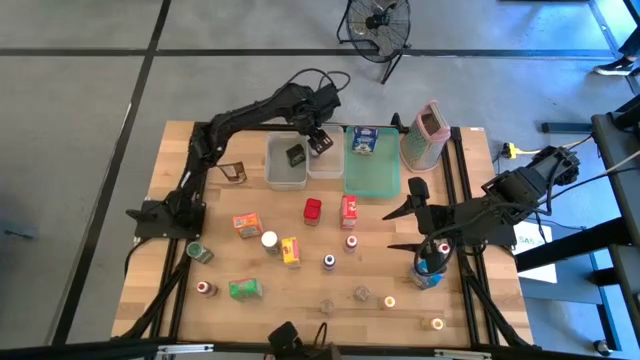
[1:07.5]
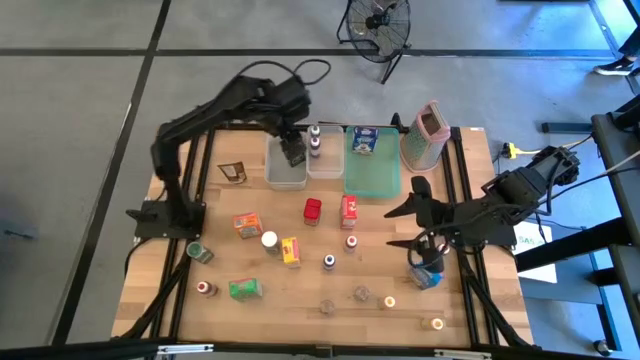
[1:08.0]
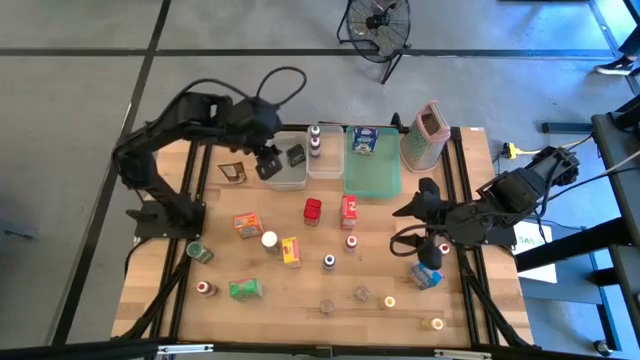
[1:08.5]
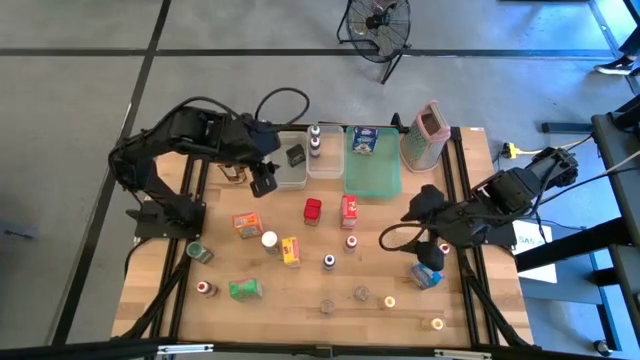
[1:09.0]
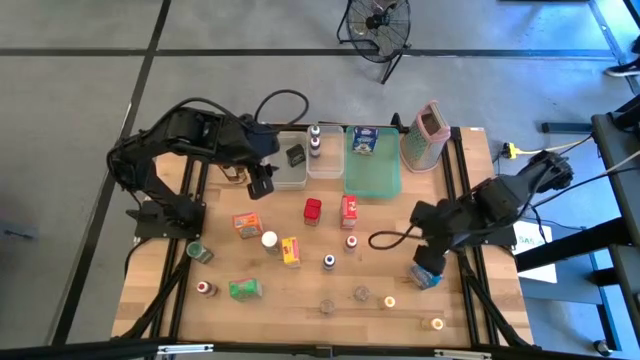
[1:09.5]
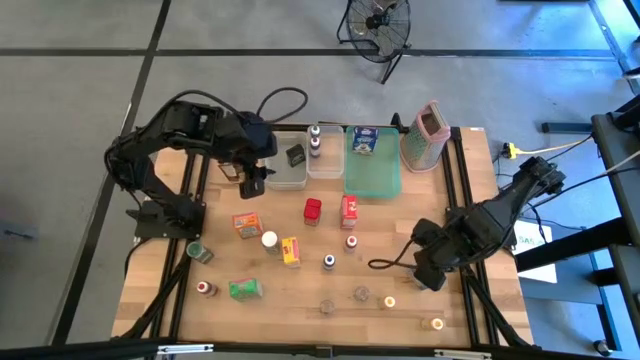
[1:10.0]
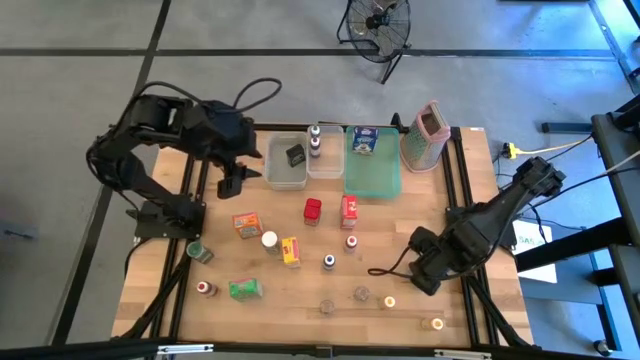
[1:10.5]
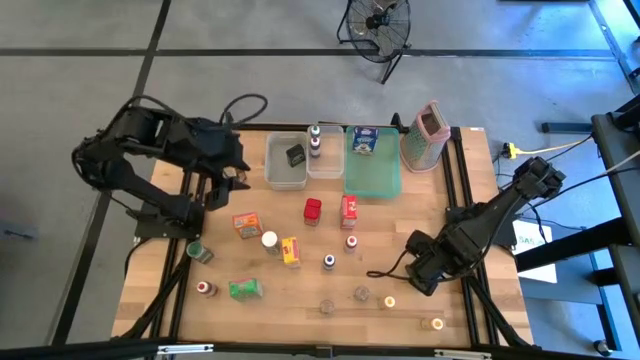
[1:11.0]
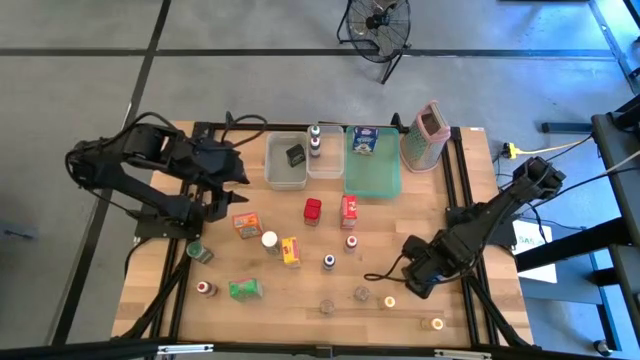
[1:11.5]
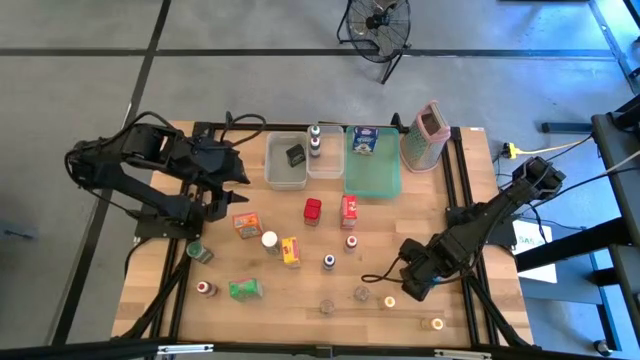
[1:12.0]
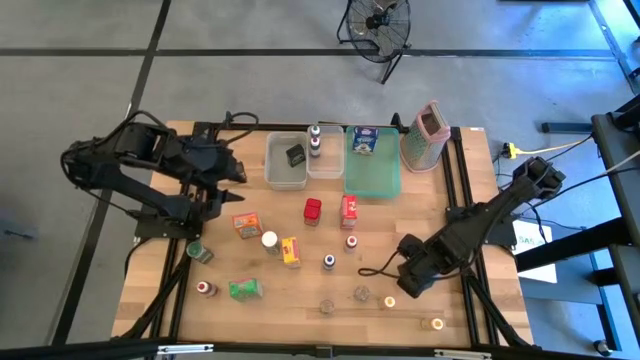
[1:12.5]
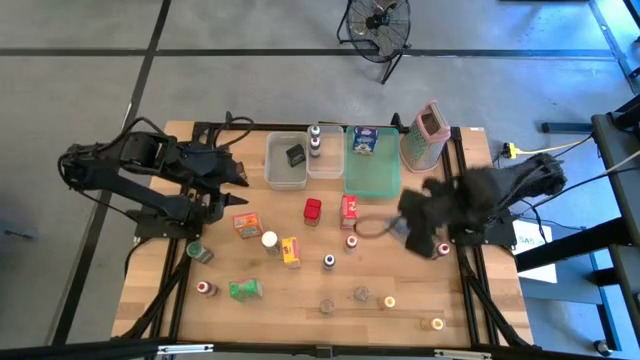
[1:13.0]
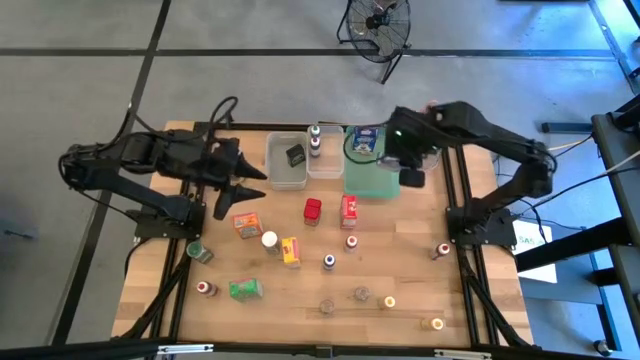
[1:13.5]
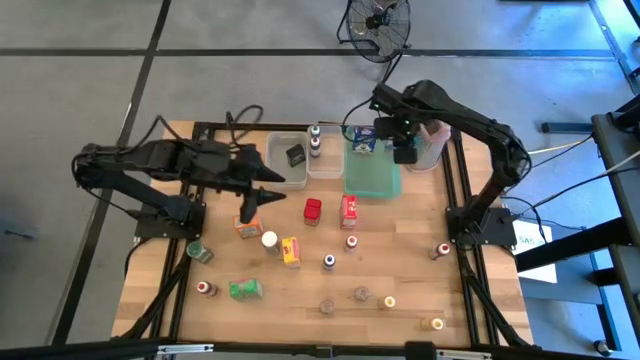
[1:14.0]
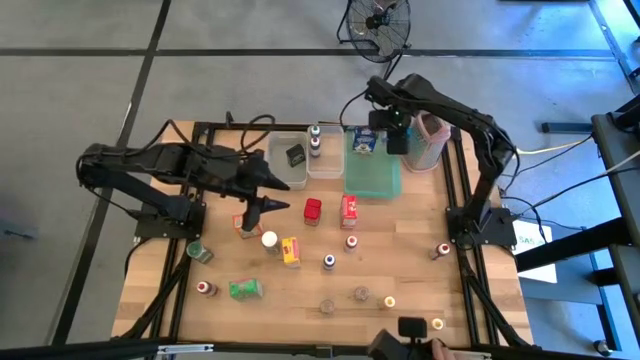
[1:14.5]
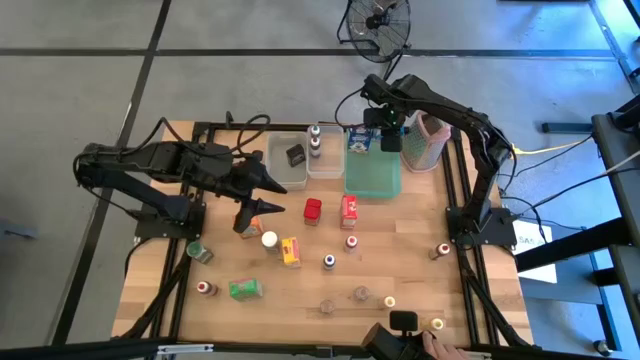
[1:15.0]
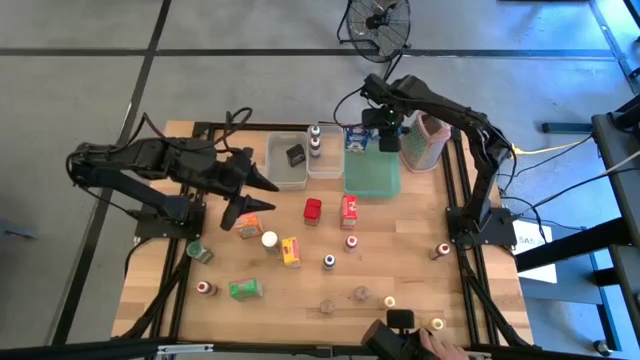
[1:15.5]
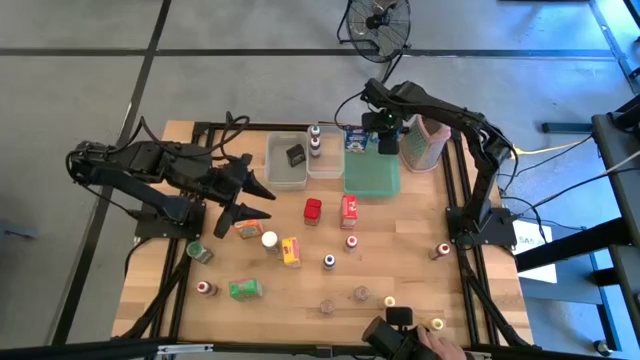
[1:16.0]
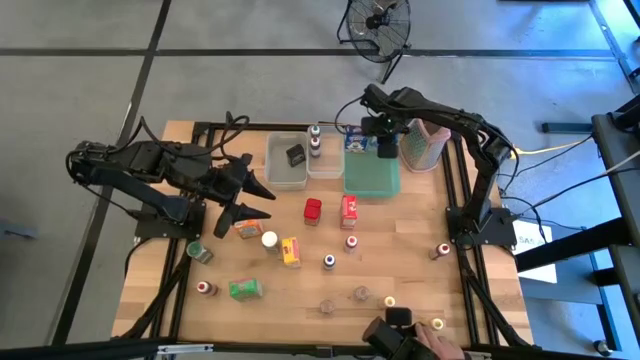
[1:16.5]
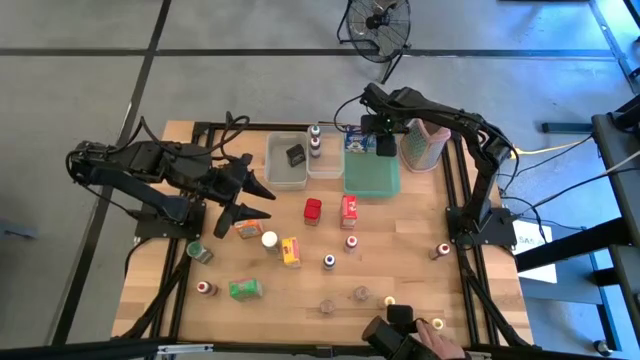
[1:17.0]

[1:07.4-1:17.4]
Task: Pick & Place Kitchen Items
Put the light blue cereal box into the green bin

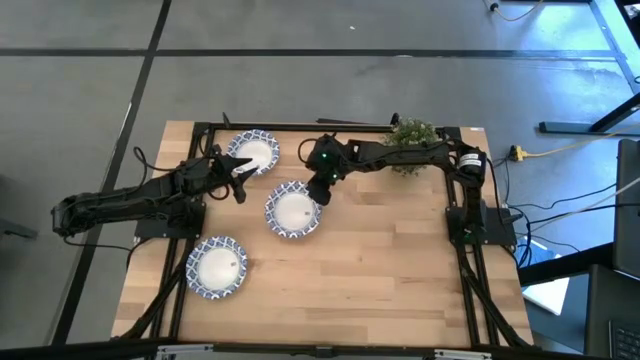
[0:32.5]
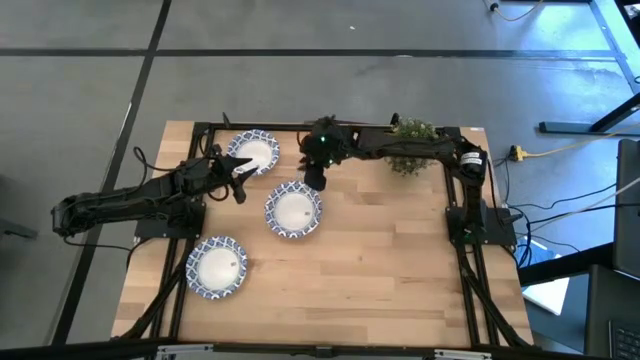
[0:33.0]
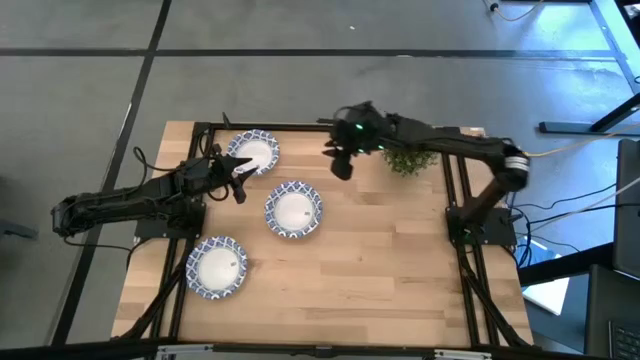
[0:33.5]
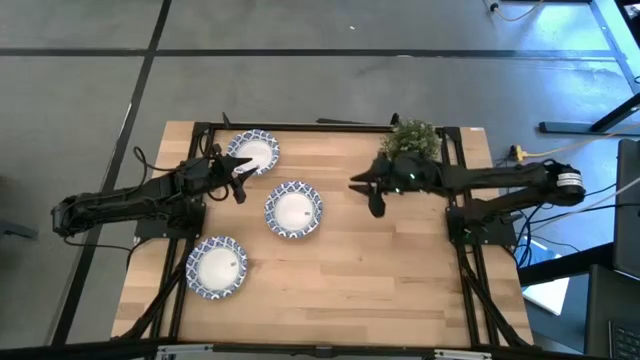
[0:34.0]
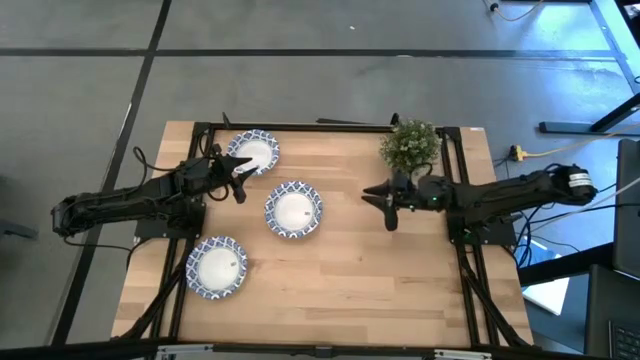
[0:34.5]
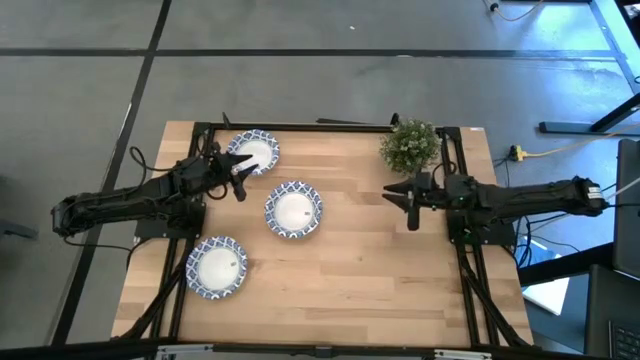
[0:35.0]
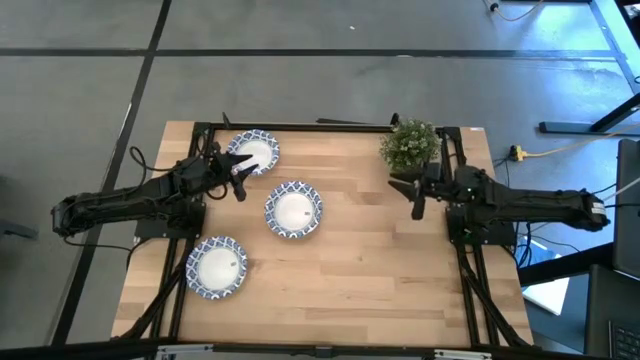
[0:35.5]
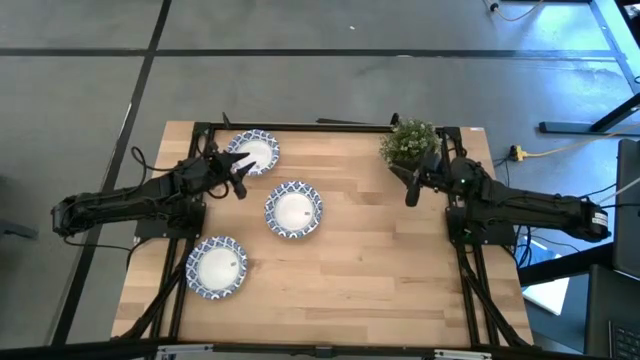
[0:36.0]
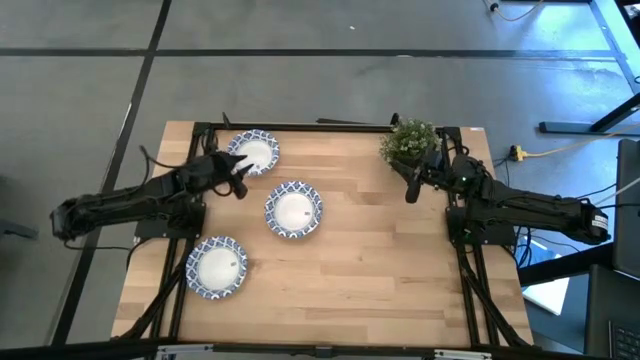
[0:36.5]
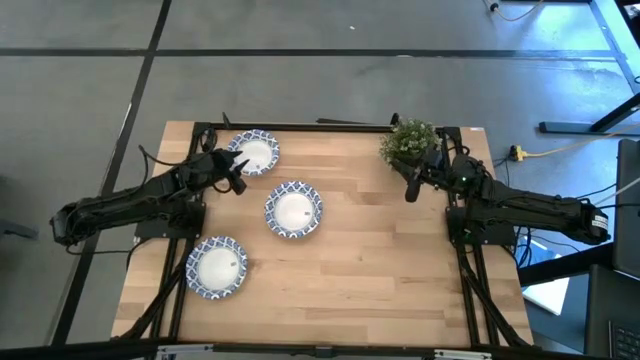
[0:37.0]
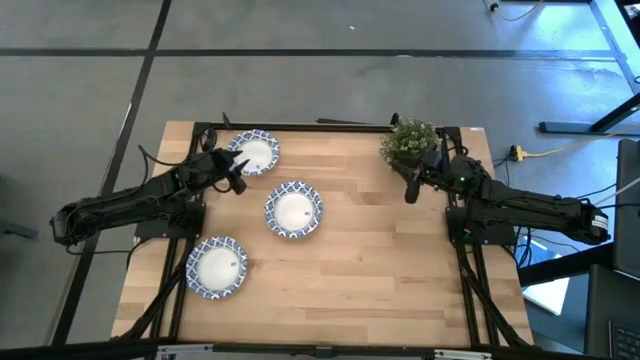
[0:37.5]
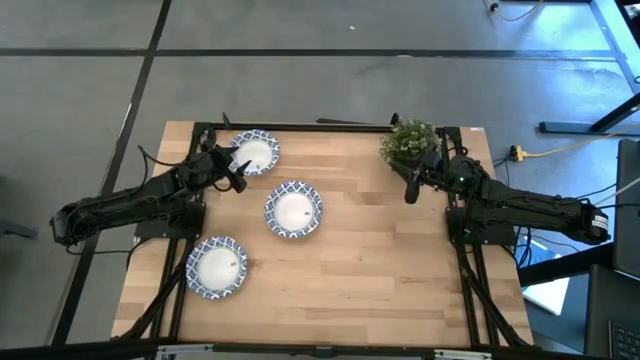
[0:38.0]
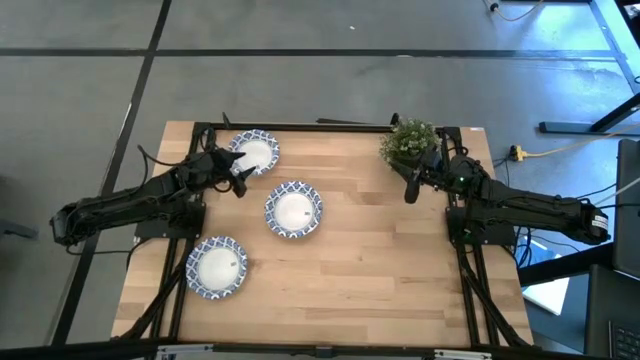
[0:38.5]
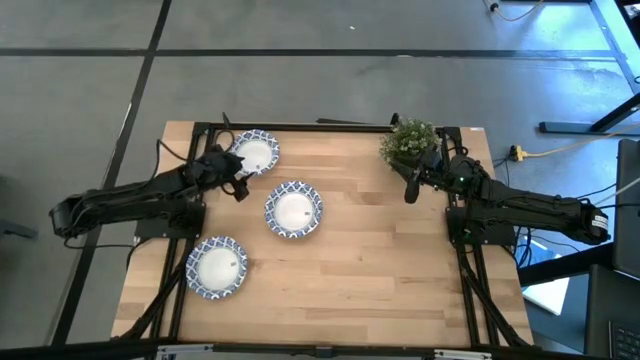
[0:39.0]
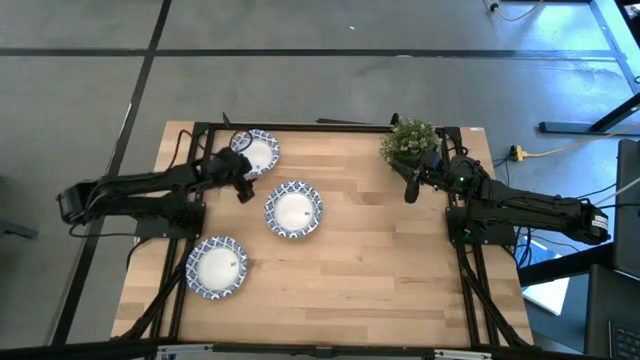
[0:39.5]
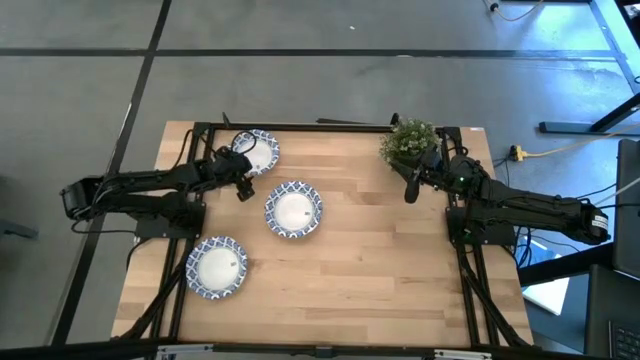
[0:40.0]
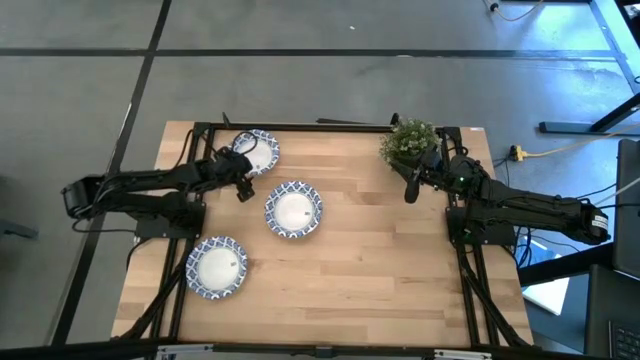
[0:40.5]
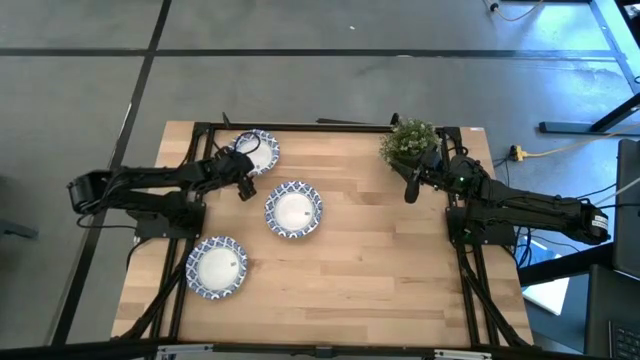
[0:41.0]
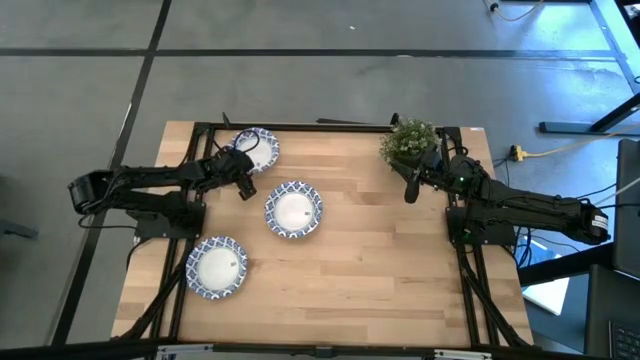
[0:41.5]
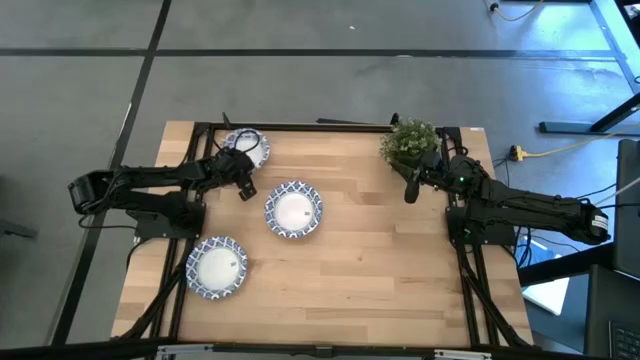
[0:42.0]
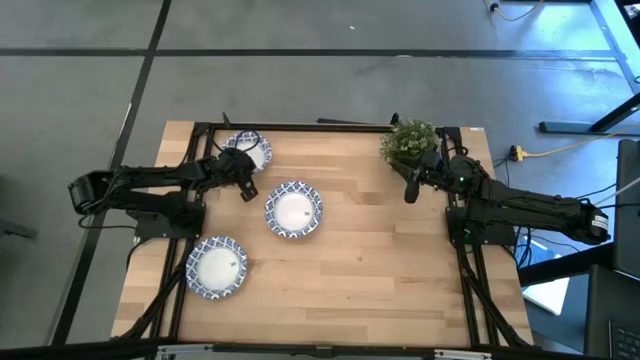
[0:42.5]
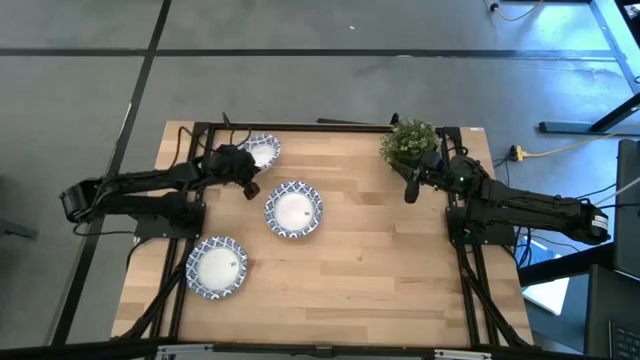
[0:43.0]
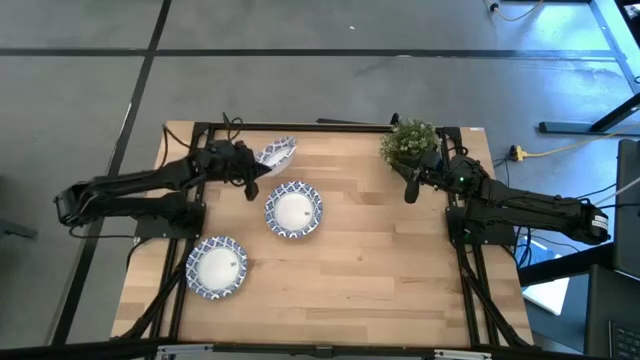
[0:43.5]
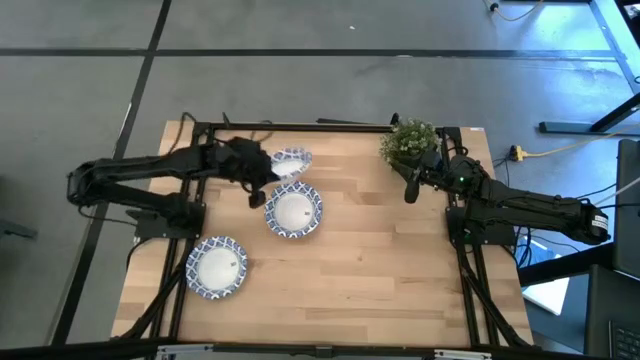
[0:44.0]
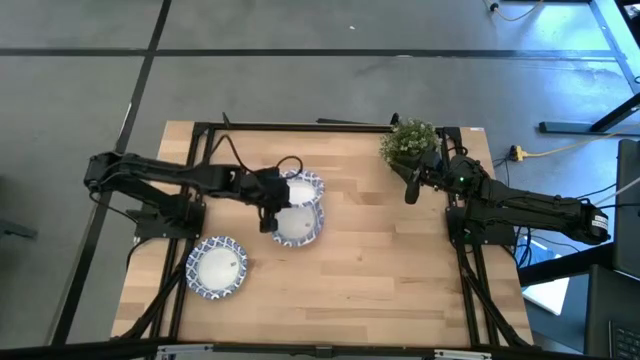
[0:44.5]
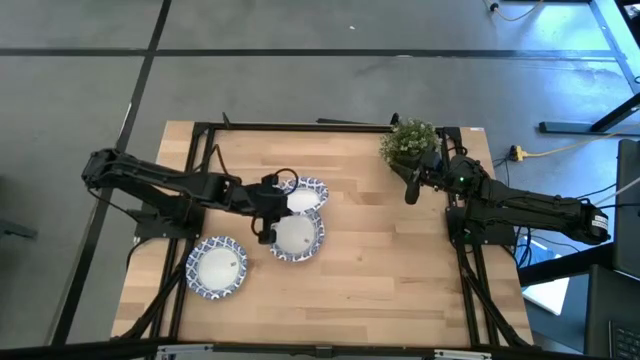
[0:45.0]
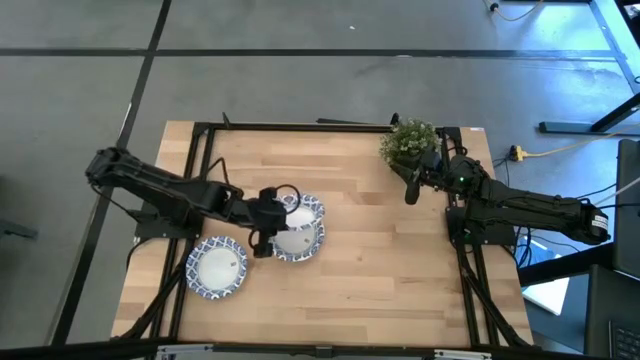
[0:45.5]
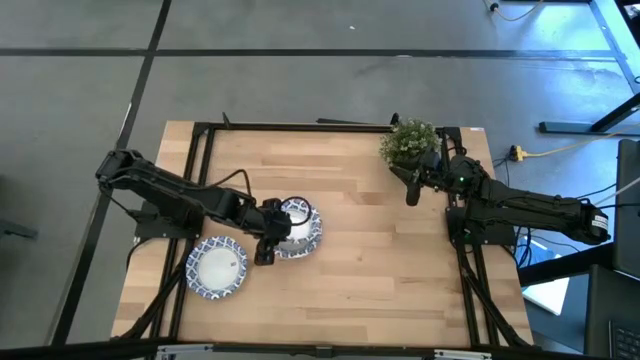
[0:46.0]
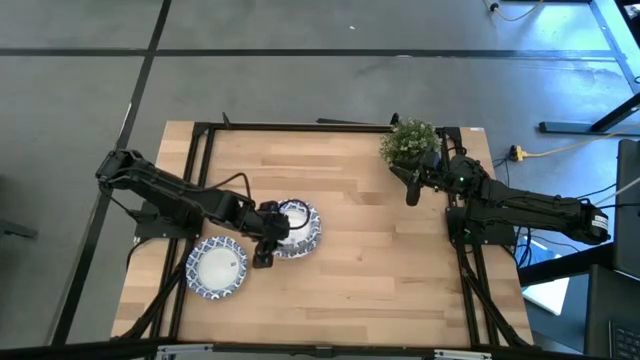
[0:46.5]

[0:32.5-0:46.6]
Task: Nest bowls inside each other
Stack the white patterned bowl on the other white patterned bowls
